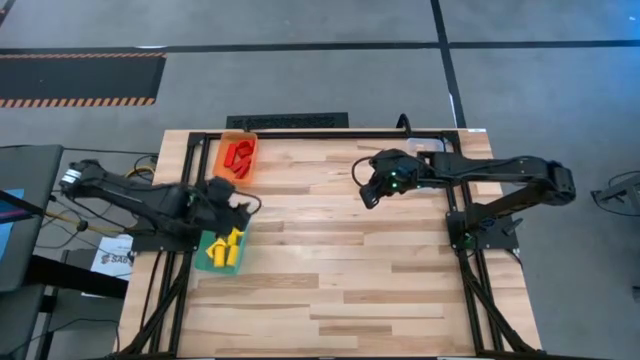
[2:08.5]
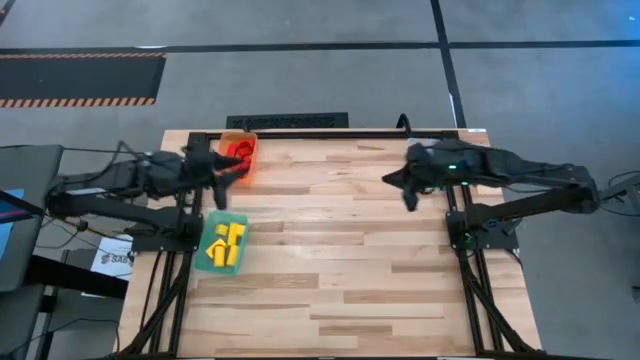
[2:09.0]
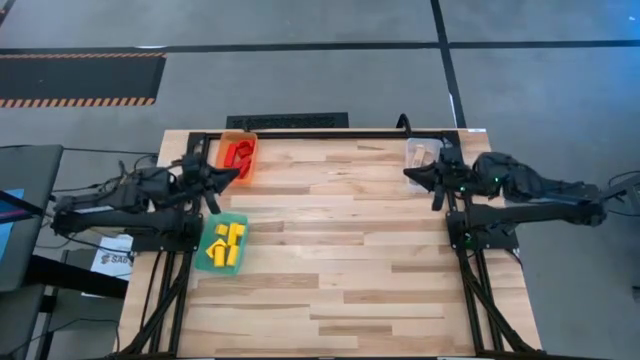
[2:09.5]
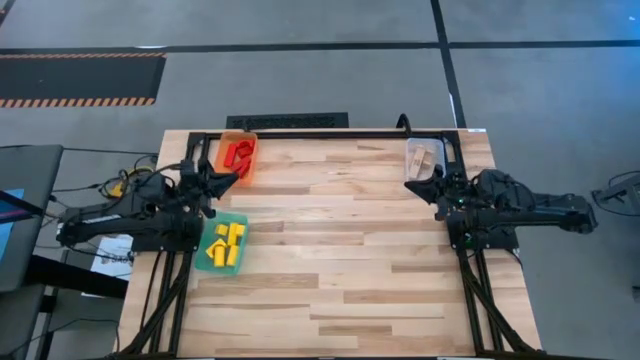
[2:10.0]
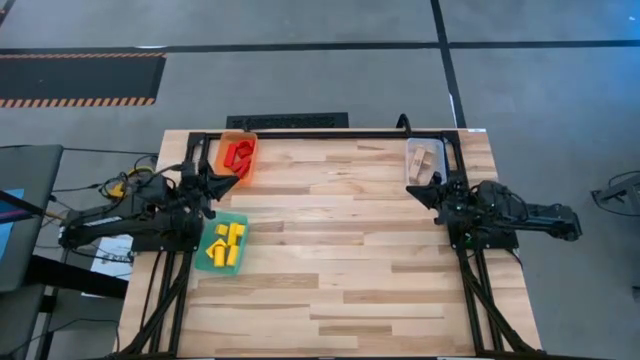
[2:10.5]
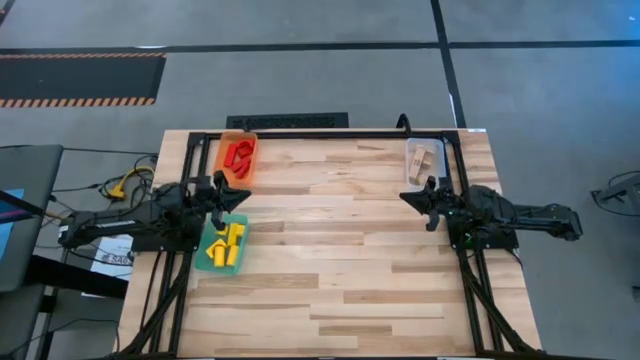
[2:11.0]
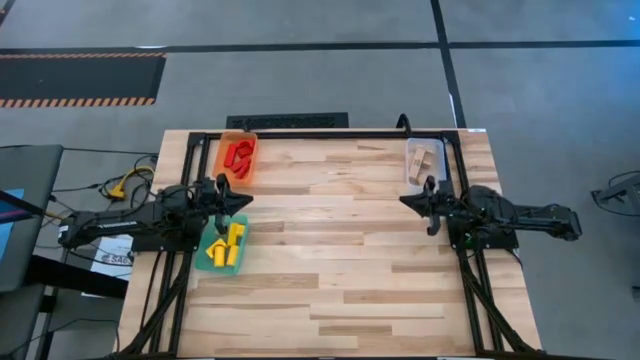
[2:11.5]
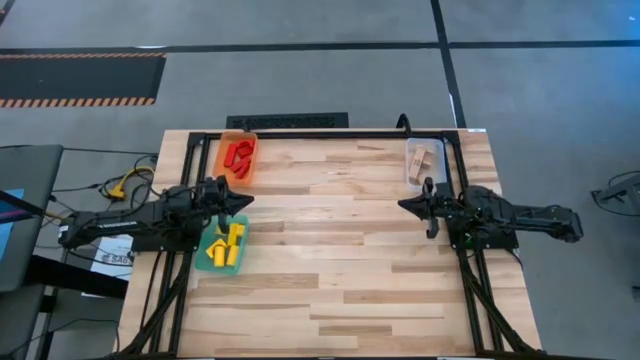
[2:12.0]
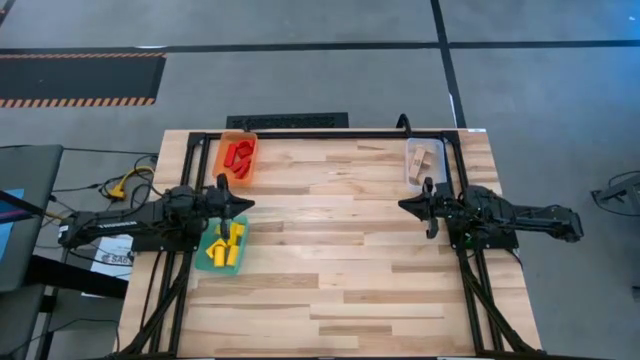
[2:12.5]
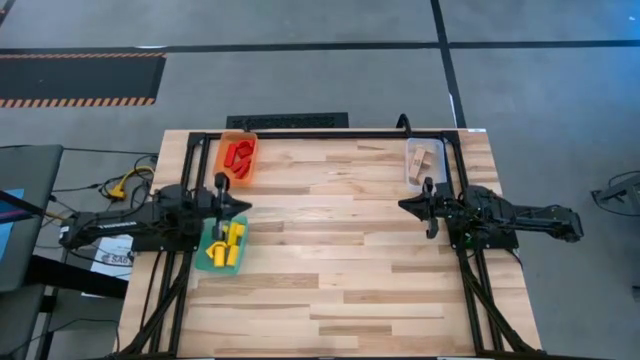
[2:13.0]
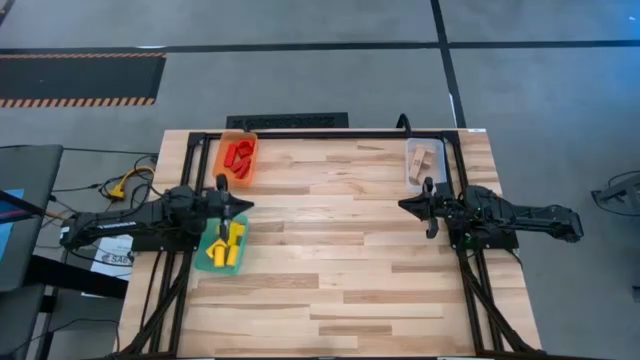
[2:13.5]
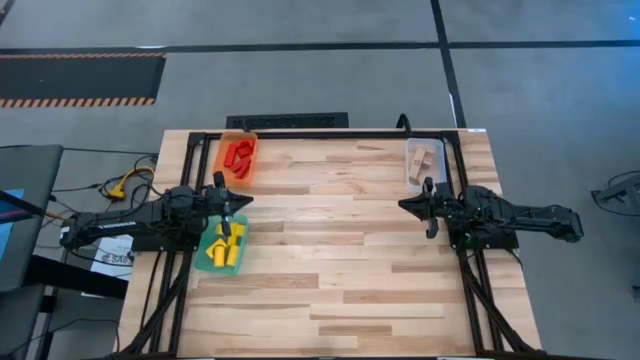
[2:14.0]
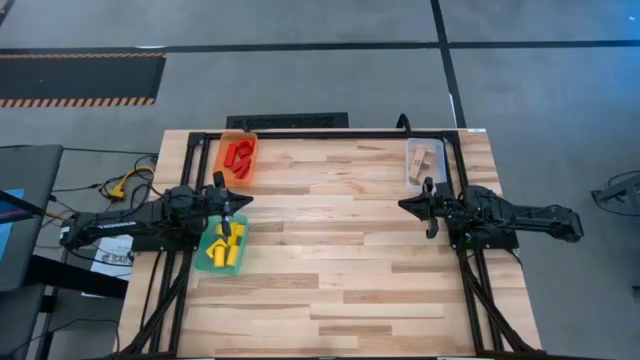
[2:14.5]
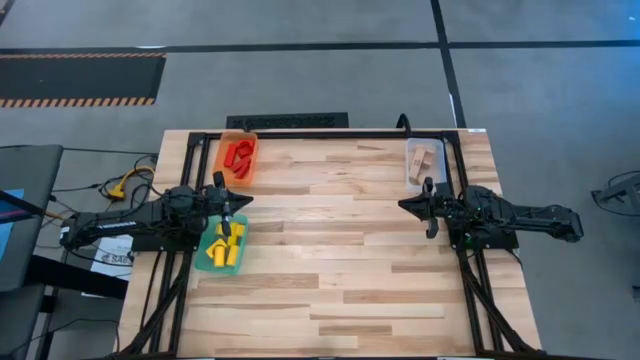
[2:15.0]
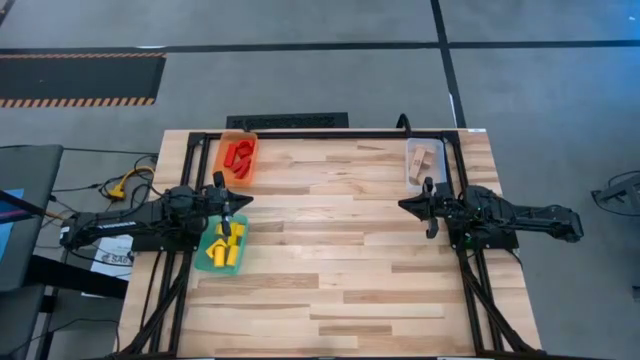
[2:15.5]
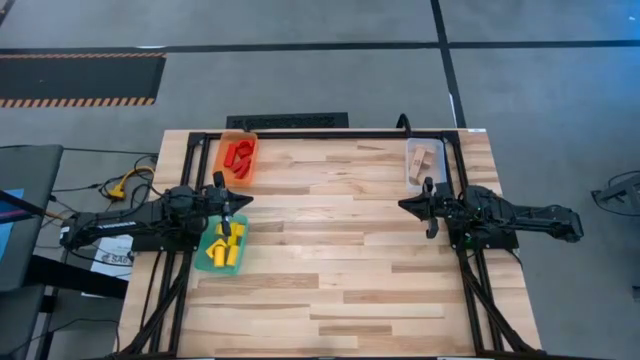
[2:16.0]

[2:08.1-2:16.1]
Task: Sort & place blocks by color
Return to Home Position
